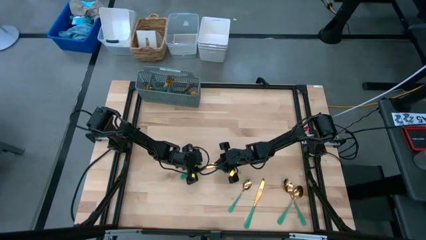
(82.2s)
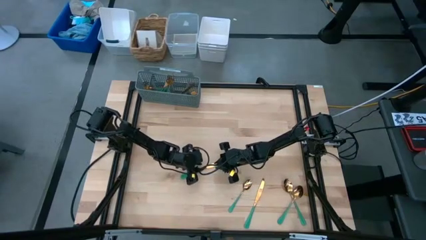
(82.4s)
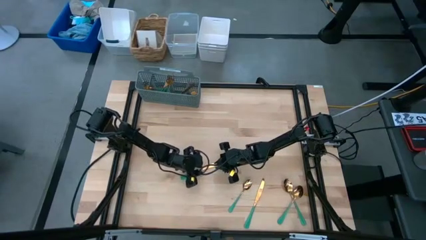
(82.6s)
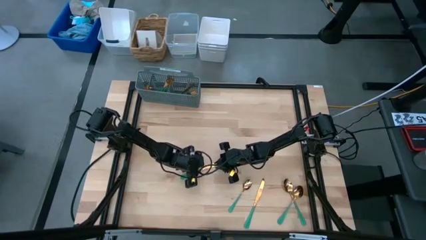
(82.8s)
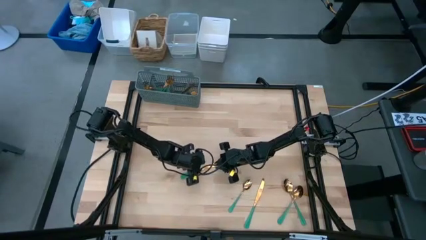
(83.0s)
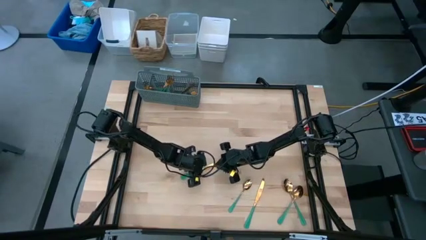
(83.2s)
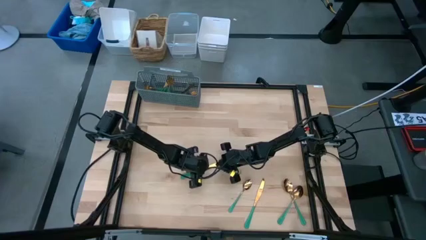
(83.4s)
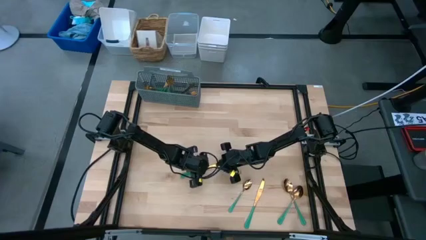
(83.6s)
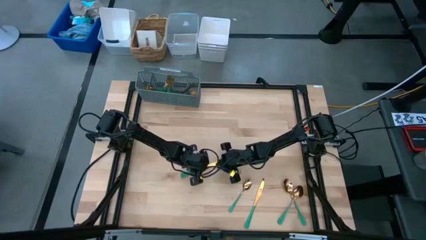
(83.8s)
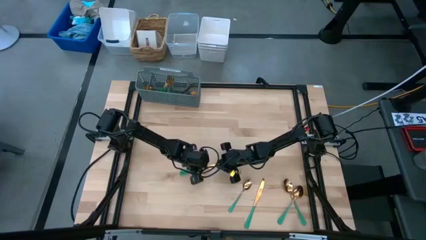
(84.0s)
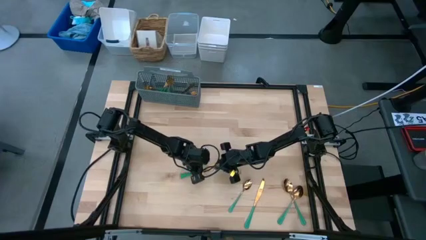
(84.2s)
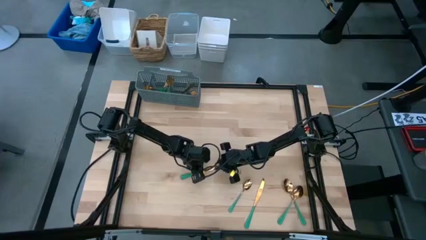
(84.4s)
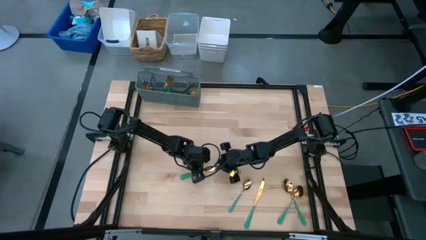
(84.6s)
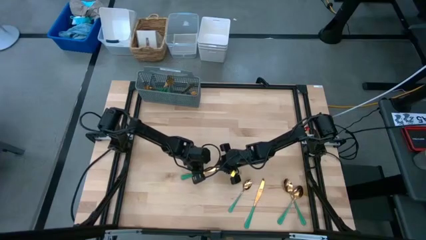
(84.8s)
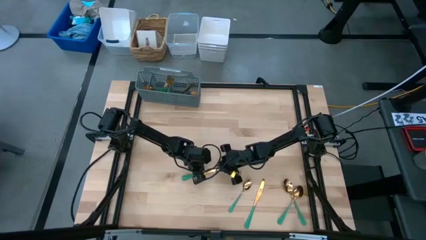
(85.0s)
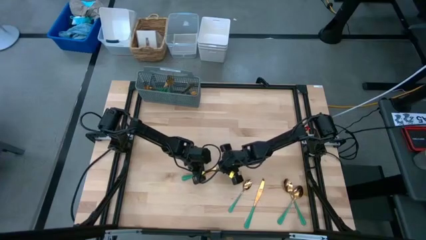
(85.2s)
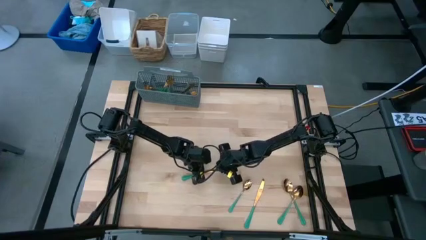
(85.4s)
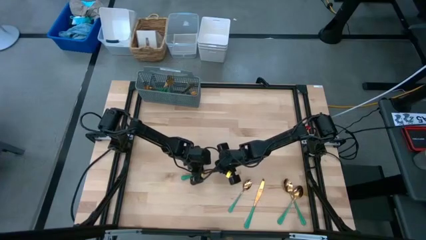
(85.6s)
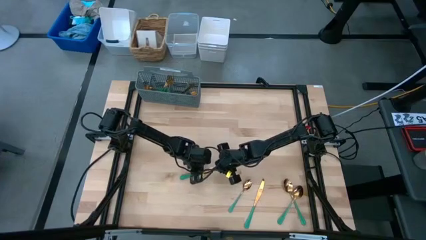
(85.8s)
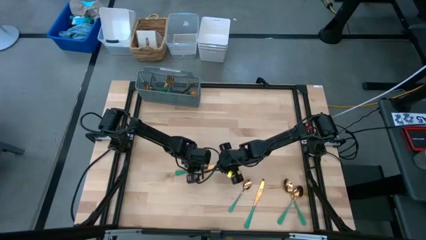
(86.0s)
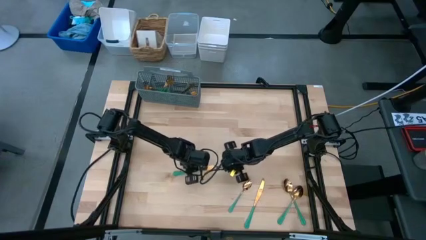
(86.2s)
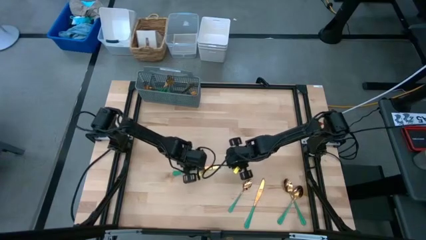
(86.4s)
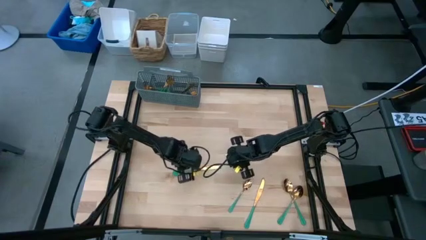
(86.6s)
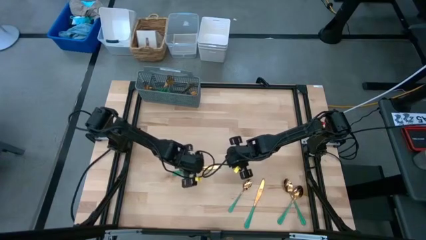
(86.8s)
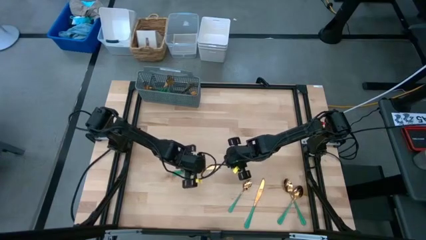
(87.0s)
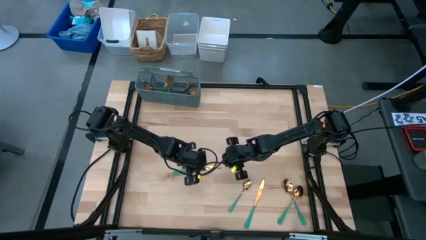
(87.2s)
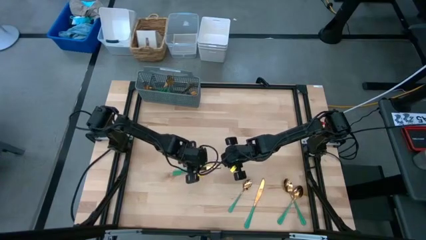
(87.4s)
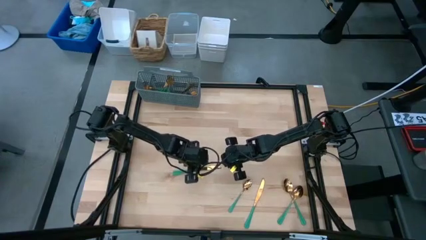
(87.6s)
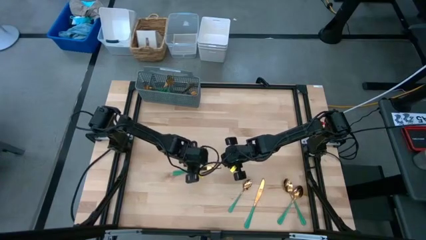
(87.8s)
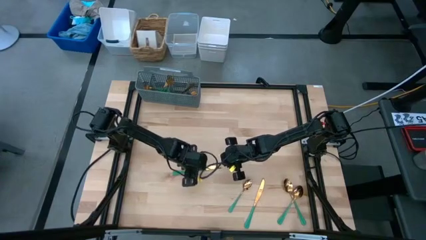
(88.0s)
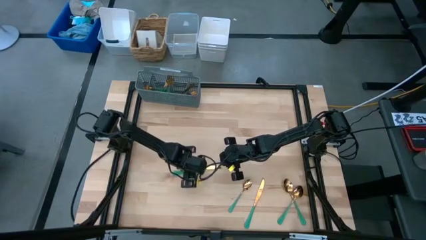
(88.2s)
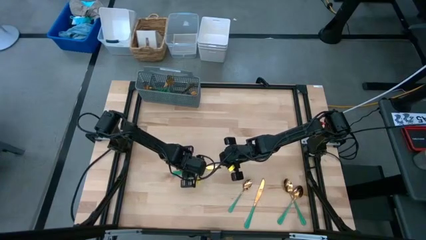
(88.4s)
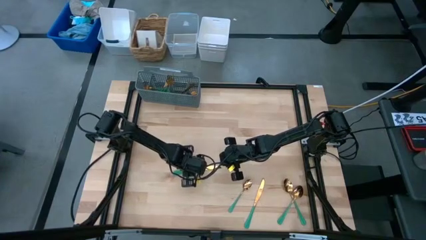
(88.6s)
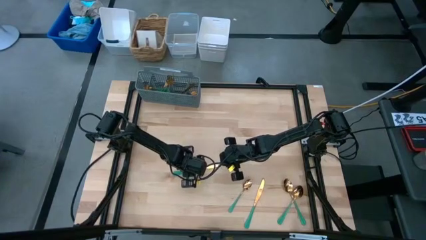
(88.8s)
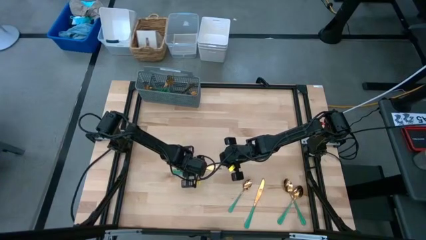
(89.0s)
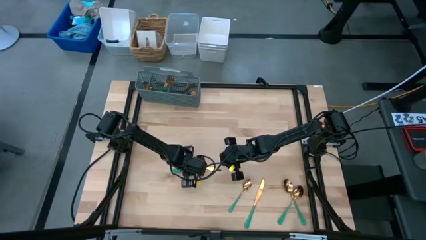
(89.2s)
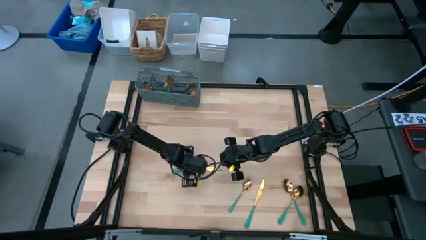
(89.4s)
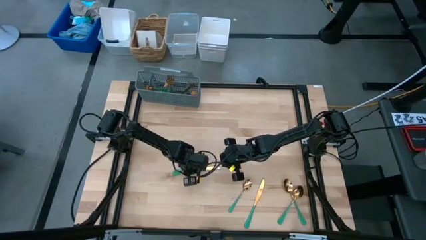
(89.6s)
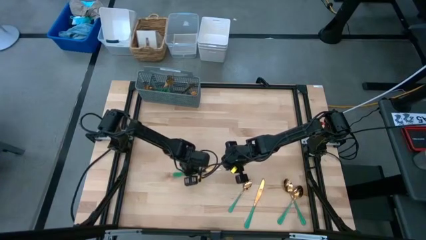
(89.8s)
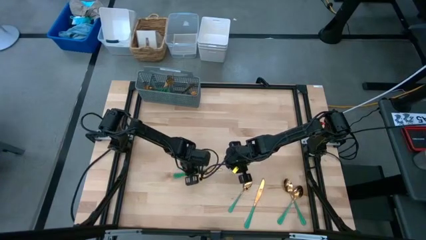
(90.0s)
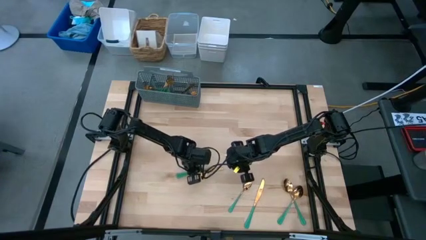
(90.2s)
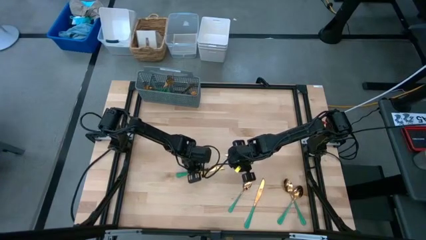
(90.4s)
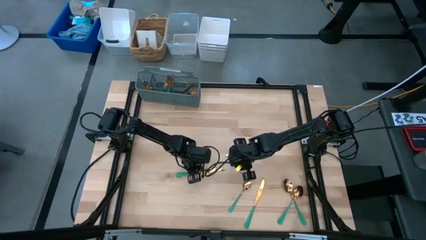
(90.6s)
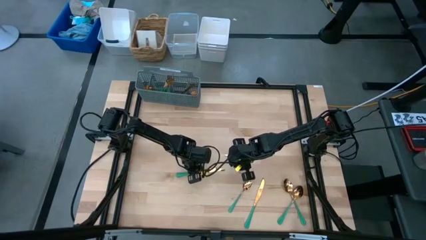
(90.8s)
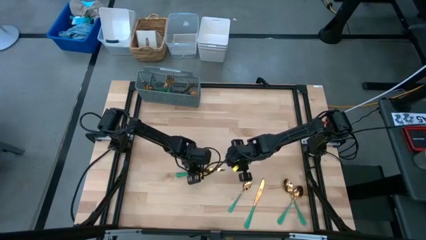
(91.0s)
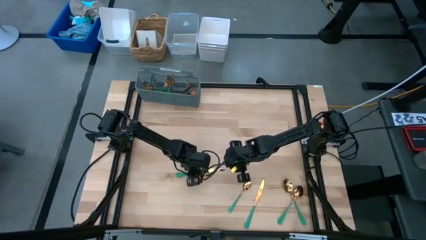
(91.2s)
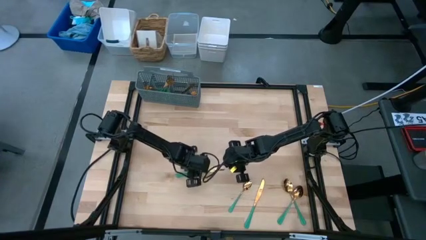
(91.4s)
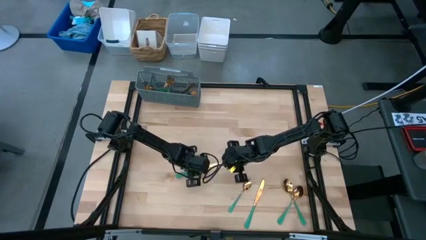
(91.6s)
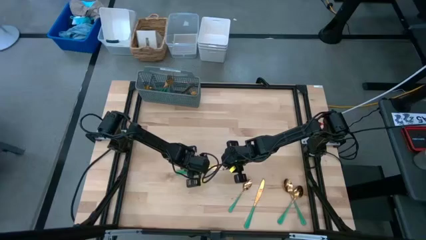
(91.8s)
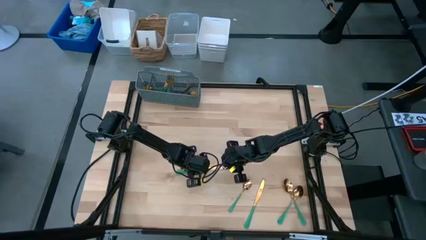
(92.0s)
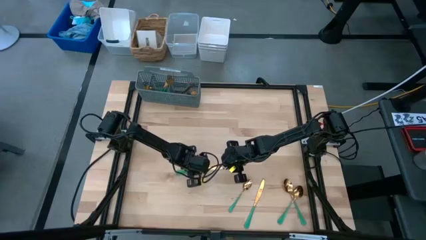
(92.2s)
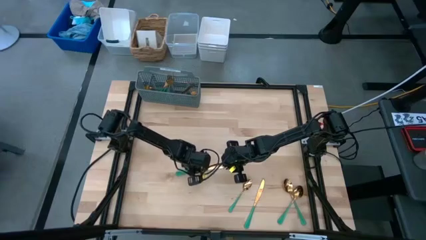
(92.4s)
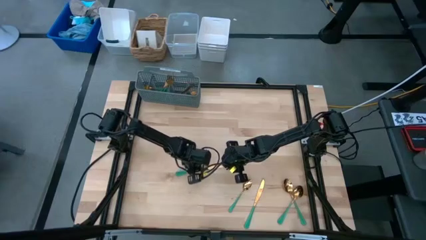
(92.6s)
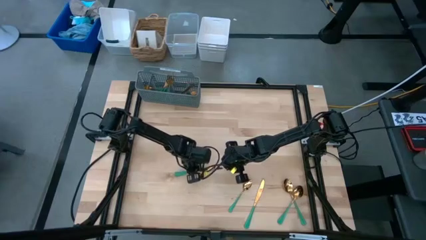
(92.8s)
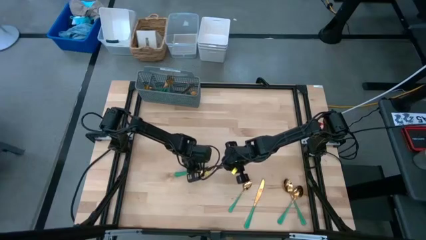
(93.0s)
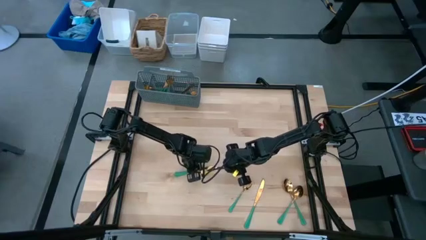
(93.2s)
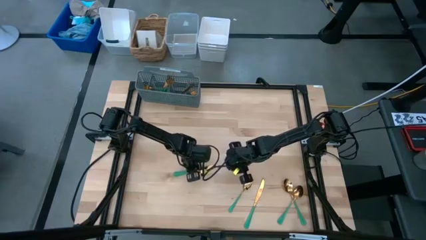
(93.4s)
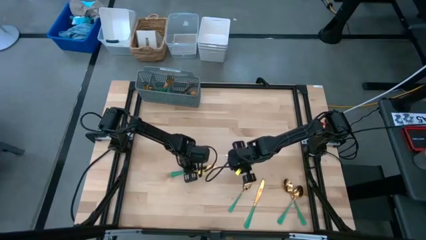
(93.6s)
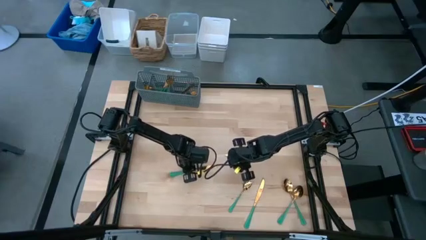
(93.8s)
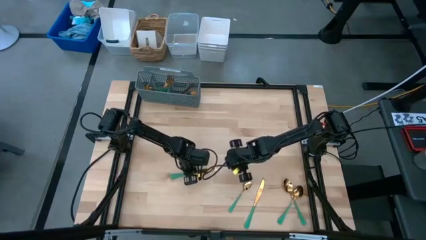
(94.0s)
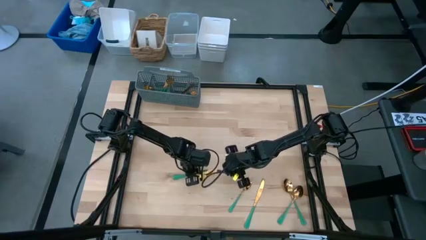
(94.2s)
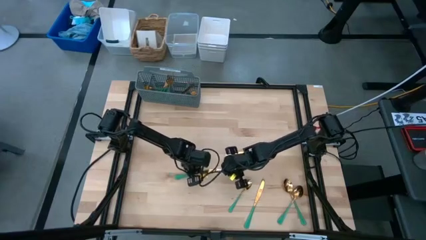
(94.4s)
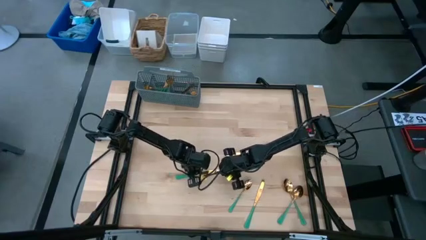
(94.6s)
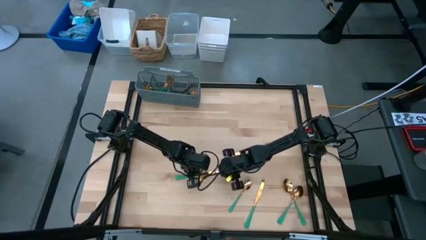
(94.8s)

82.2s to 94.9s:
Task: Sort silverware
Put the green knife into the gray silverware basket

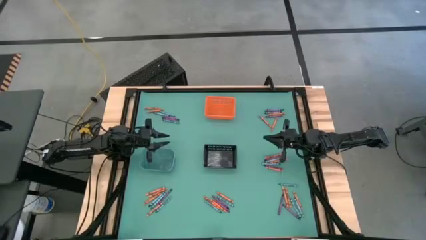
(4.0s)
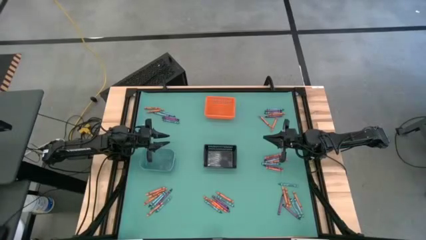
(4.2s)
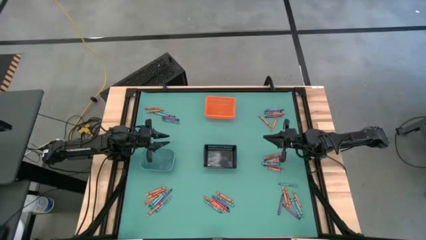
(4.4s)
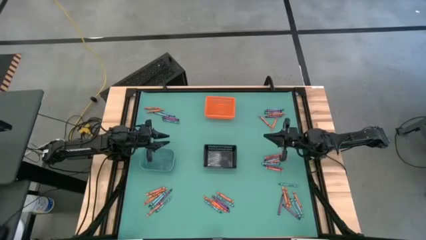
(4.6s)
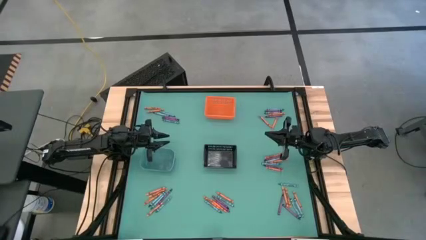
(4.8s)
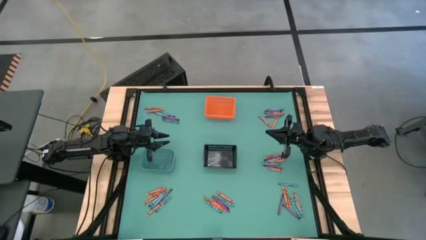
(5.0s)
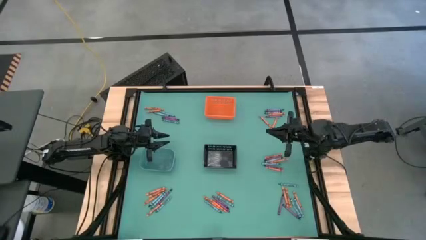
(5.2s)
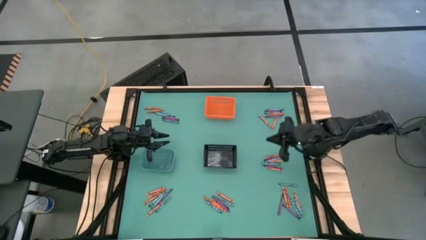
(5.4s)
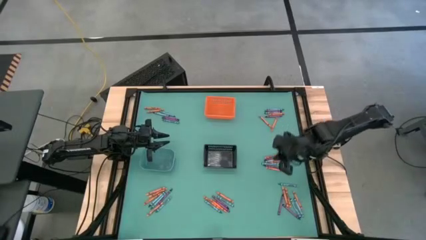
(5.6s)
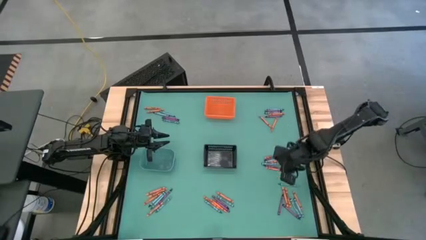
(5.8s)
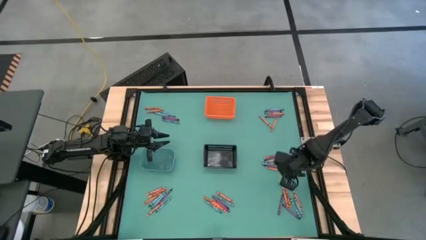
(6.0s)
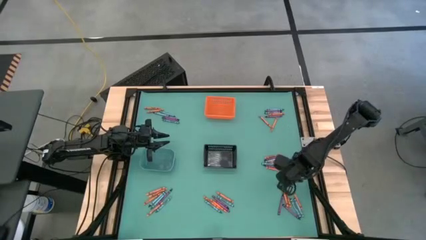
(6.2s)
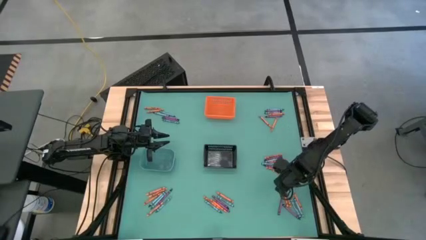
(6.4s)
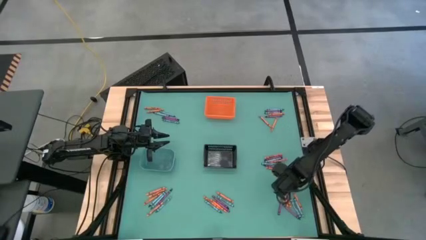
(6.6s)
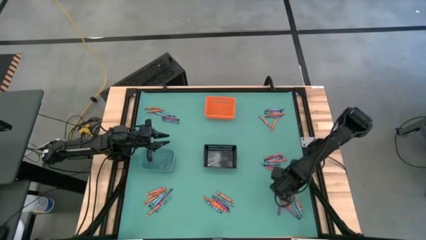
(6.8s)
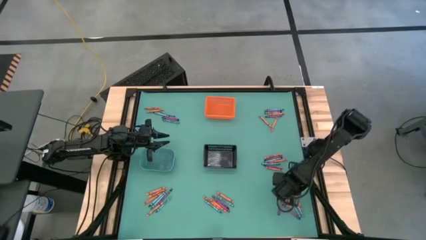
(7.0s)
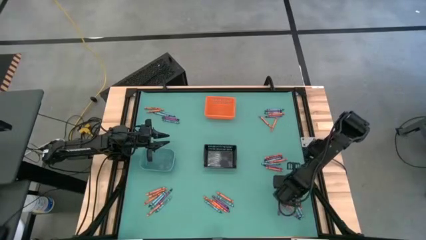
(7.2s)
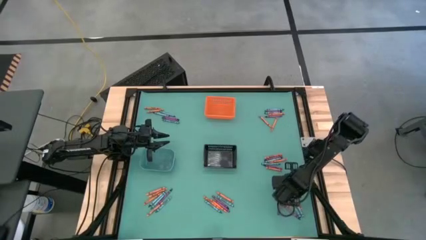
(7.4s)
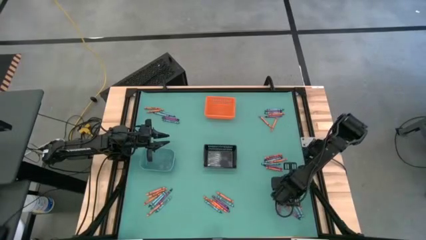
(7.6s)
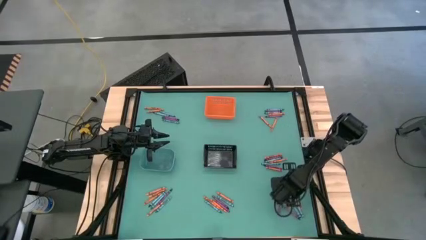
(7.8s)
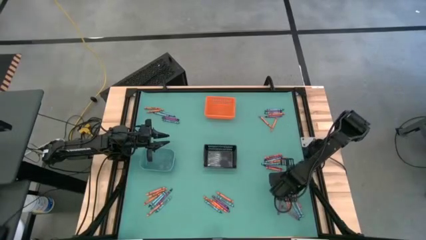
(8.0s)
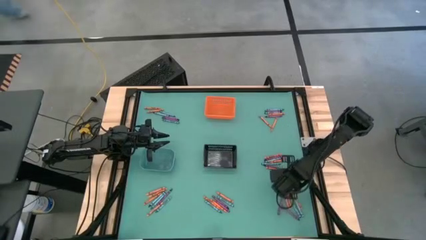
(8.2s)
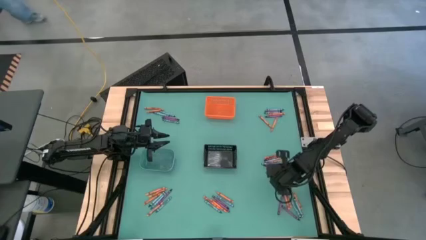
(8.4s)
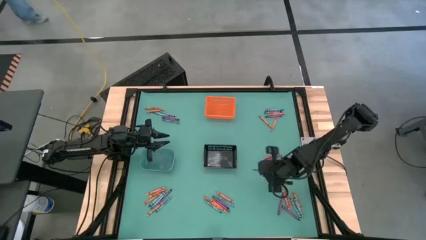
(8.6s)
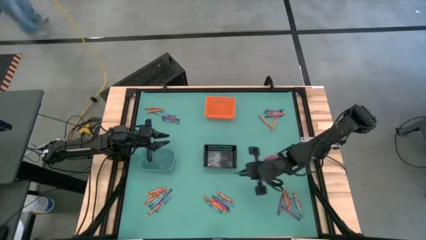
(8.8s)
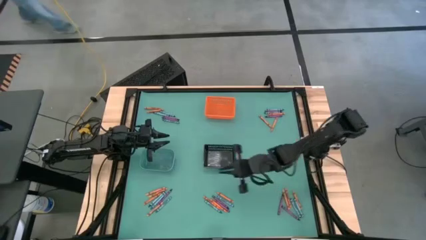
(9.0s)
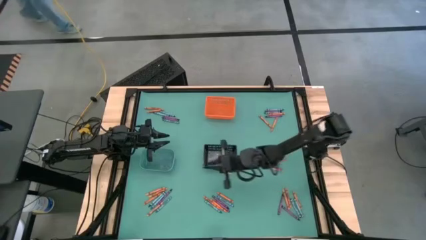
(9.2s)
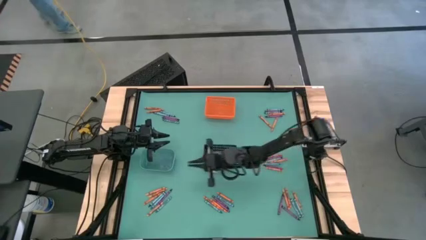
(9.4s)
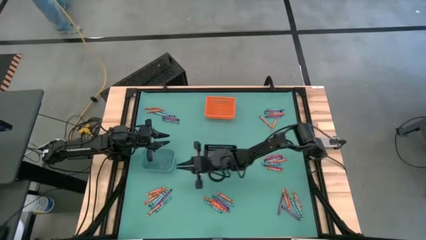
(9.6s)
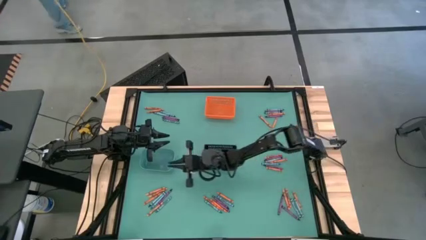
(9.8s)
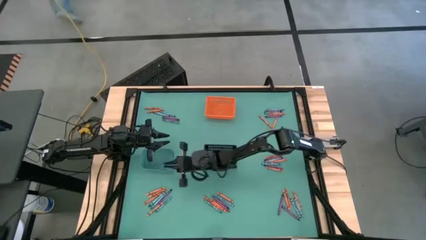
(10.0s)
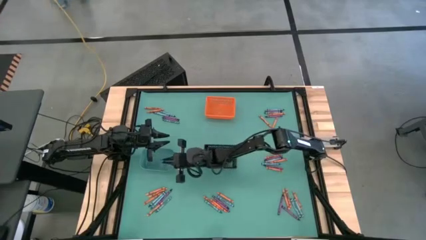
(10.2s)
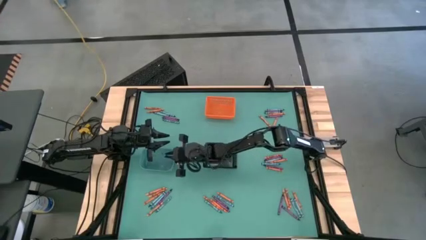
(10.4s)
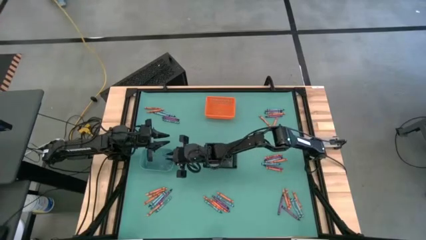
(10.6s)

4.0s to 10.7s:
Task: Sort crayons
Put the blue crayon into the light blue bin
